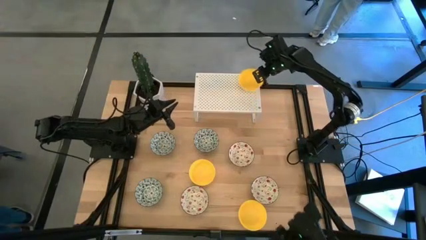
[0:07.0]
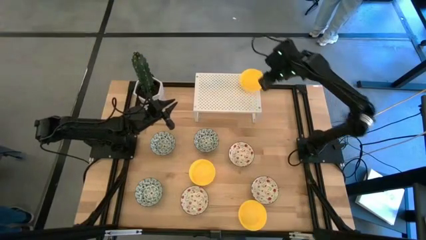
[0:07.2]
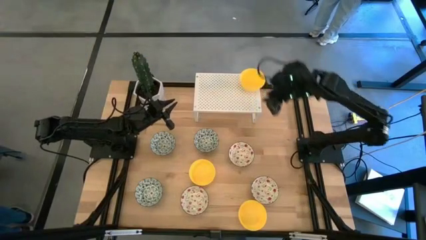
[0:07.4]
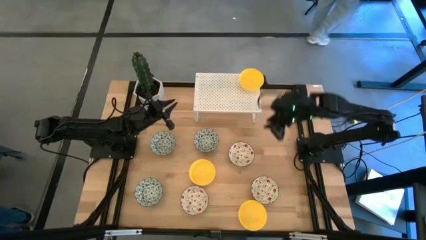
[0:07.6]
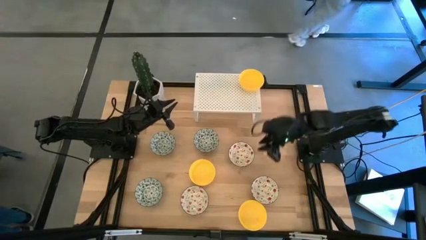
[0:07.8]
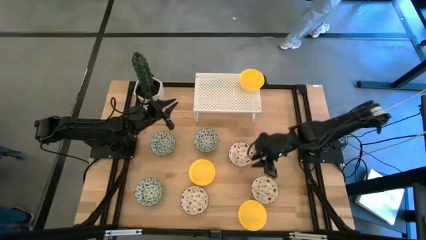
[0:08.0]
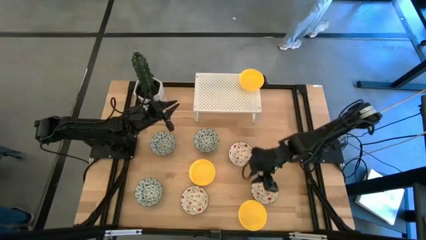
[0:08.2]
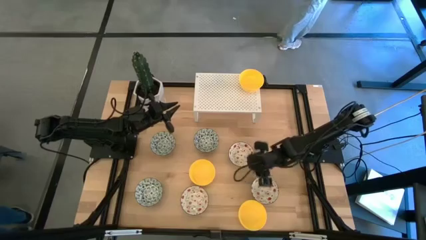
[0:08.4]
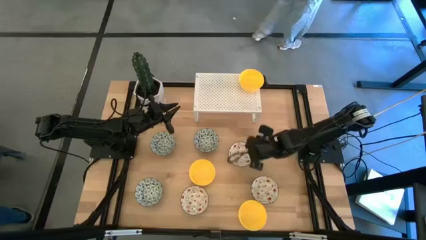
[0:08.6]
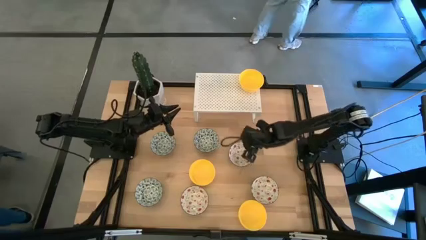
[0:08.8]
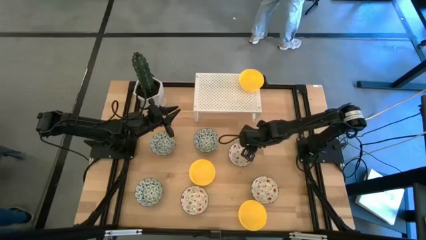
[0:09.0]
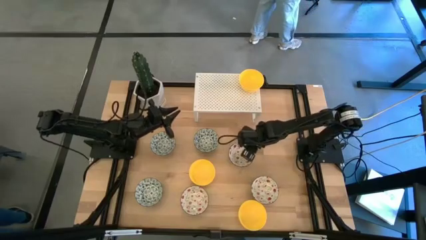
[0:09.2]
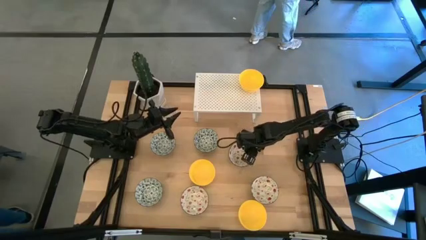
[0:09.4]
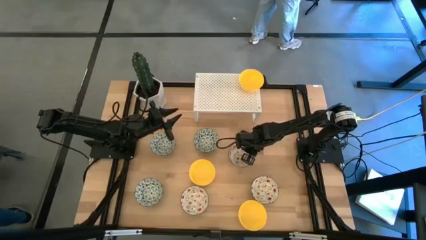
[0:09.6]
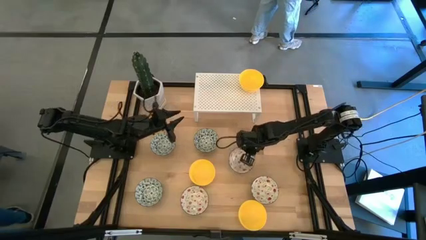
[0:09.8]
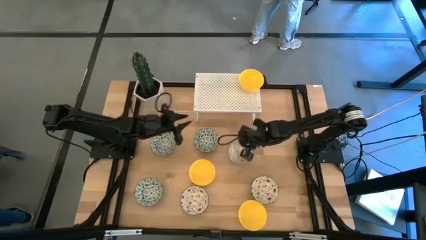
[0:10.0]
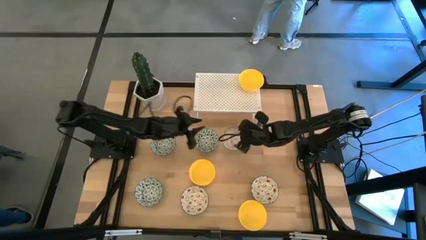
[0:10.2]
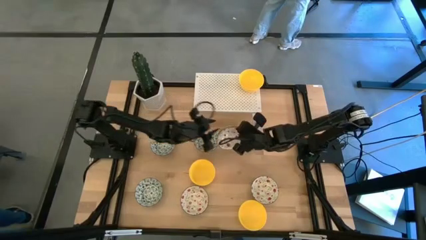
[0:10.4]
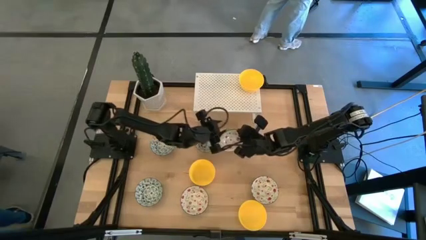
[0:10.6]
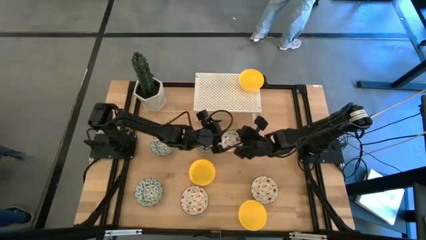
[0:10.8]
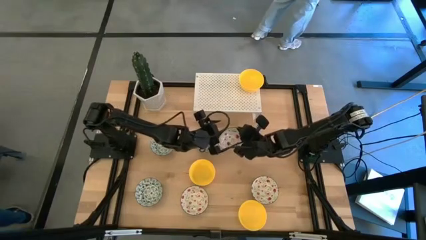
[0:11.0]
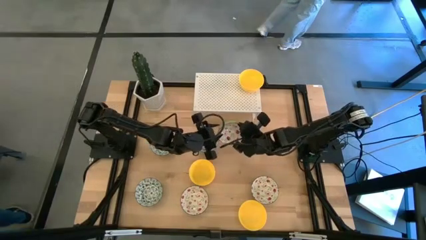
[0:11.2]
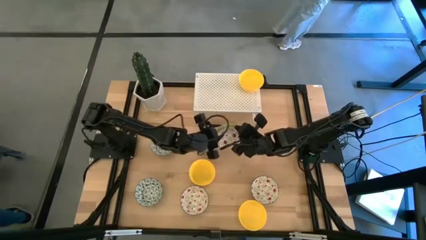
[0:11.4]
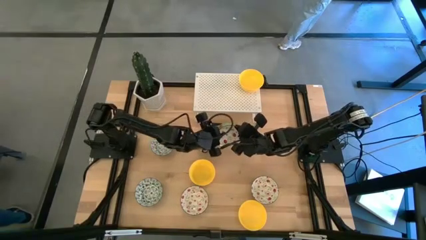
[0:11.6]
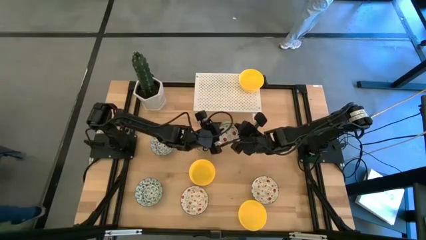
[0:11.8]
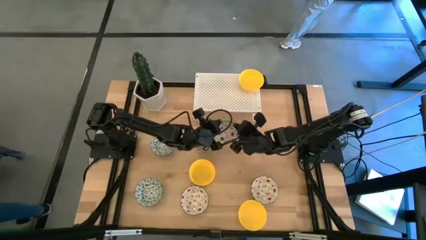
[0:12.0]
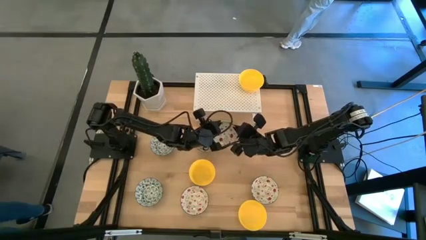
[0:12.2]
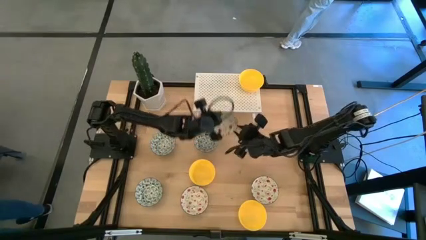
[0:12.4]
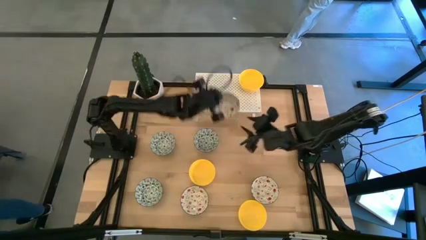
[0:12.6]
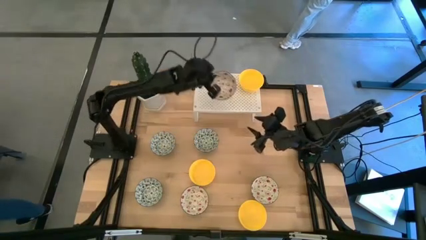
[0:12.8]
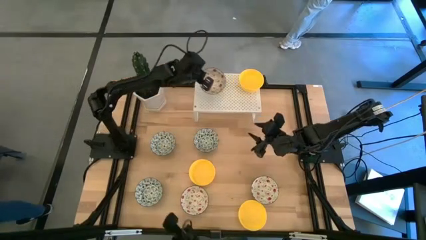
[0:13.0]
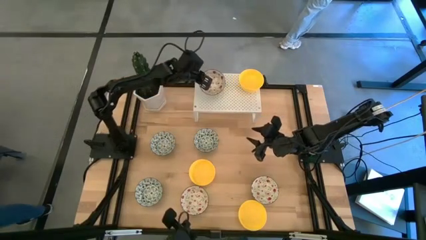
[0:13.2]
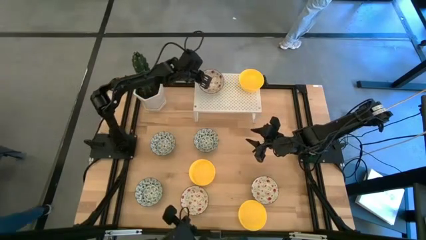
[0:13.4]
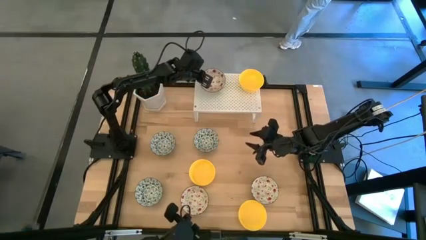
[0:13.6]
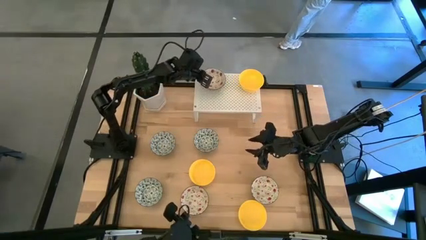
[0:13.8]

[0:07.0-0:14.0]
Task: Pick & Place Mini bowls
Put the top red white bowl on the shelf

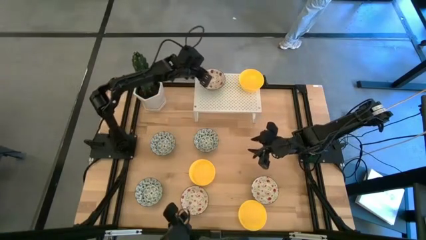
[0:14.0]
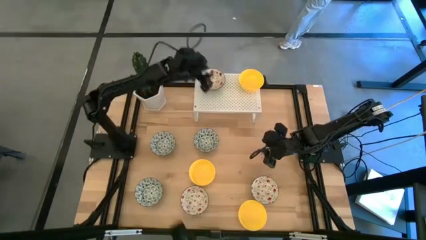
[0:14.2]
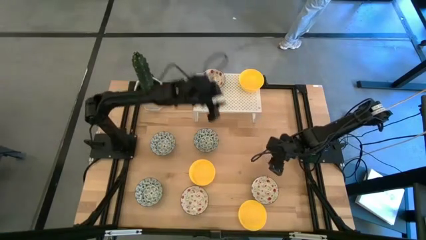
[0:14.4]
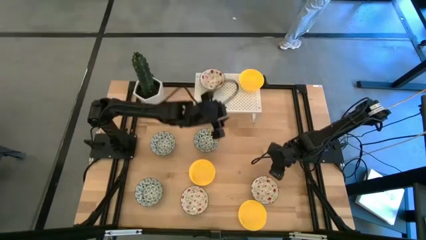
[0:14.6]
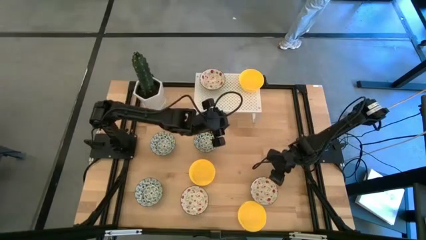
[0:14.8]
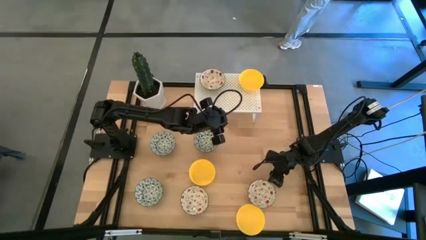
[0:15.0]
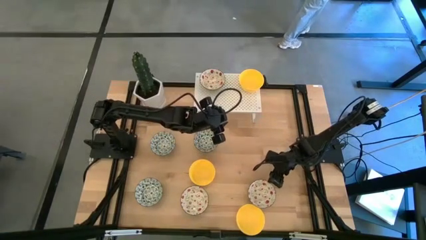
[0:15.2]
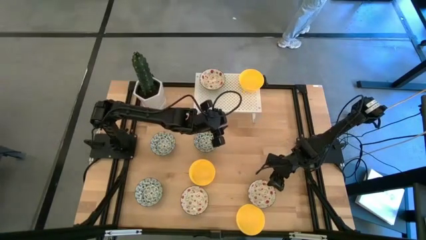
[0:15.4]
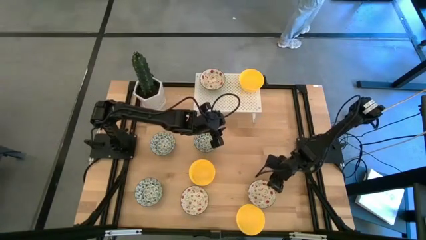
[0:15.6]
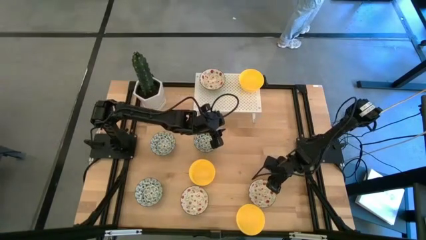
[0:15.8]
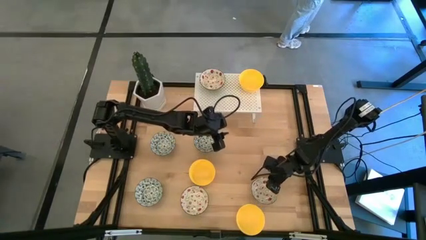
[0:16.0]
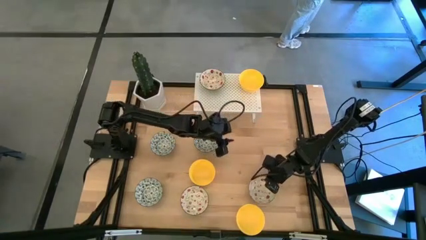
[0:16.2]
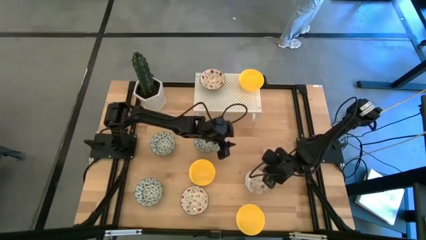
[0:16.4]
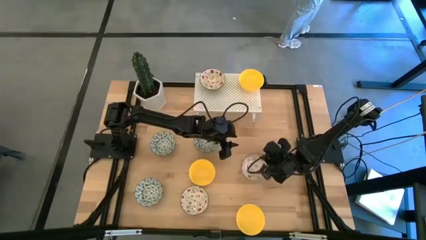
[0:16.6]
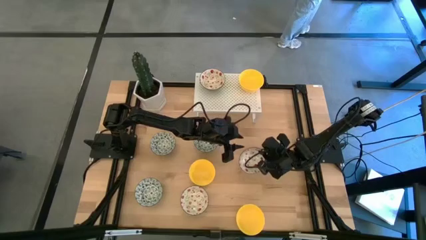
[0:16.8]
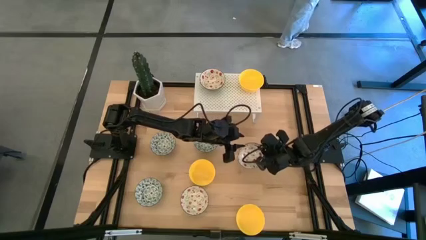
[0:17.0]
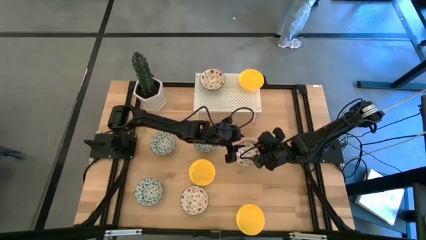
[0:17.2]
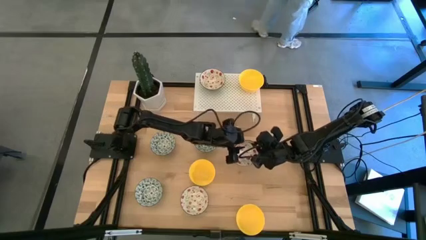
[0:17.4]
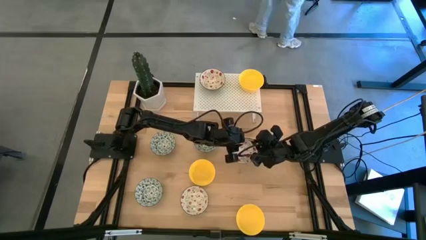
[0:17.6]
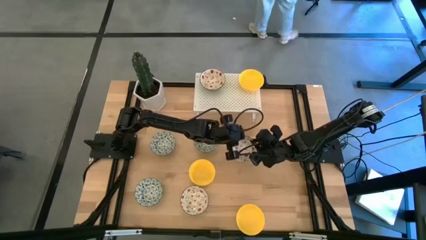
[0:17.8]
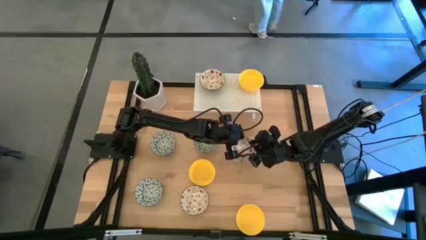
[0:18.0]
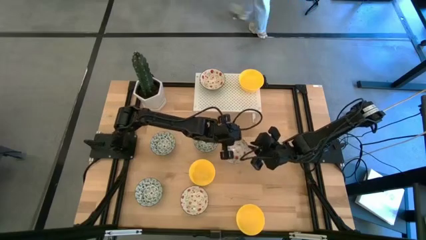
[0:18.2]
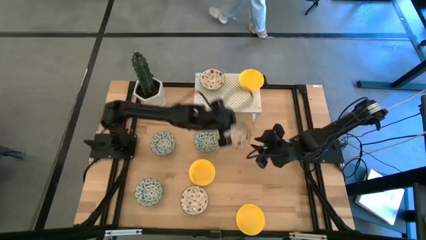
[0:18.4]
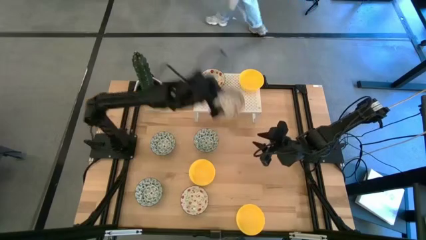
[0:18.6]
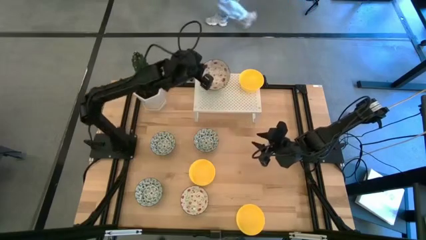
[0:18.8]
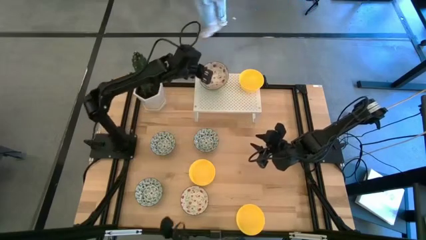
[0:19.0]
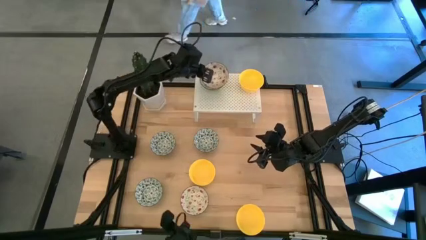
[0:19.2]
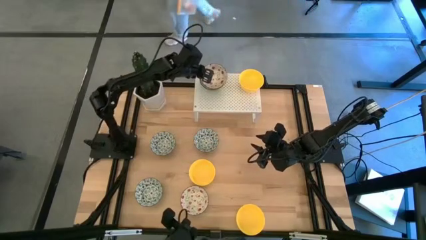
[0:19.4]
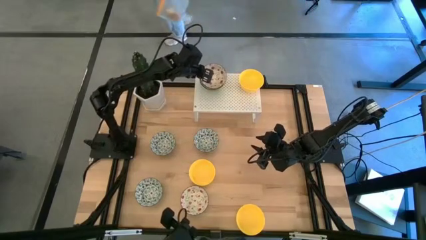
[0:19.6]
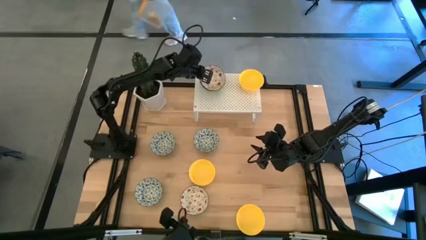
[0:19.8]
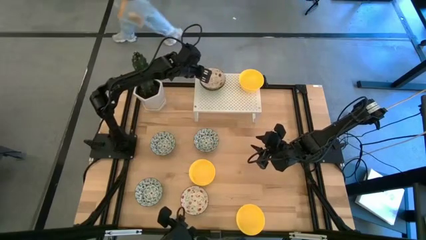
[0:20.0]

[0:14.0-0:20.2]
Stack the right red white bowl on top of the red white bowl on the shelf

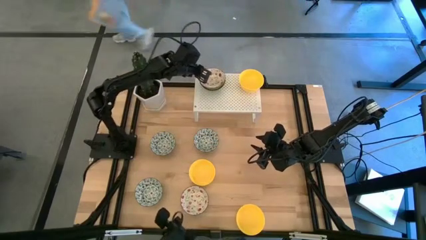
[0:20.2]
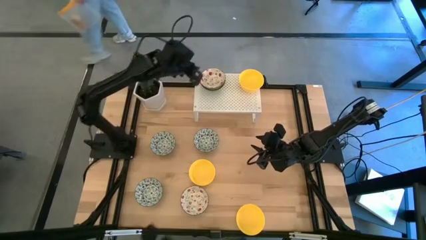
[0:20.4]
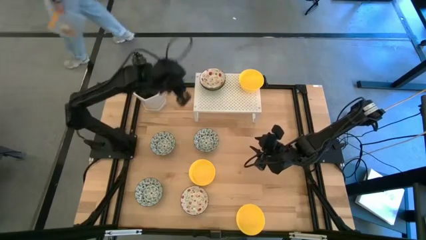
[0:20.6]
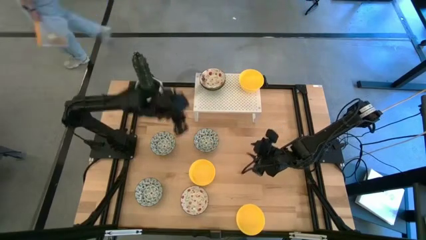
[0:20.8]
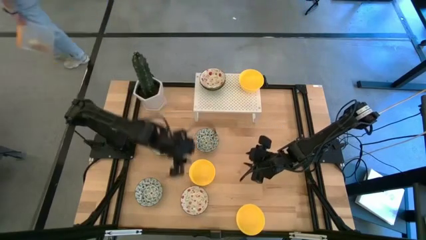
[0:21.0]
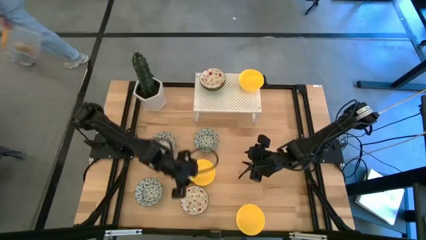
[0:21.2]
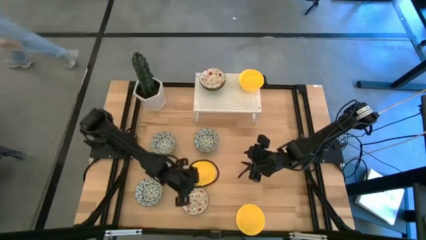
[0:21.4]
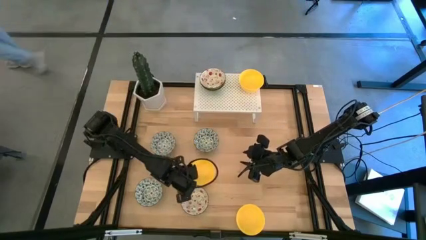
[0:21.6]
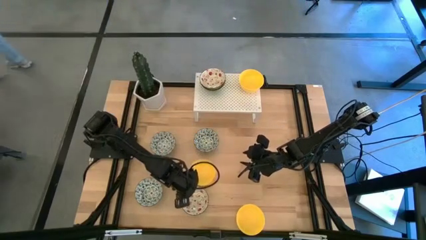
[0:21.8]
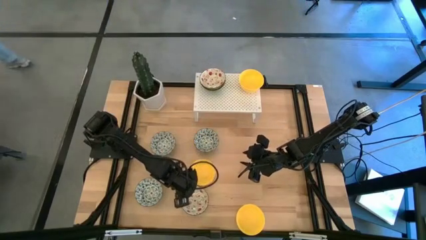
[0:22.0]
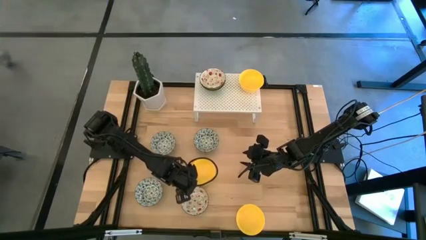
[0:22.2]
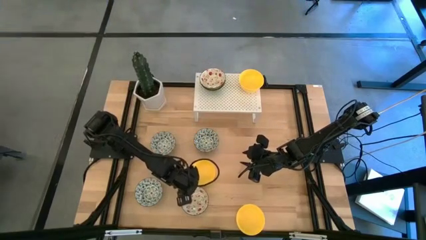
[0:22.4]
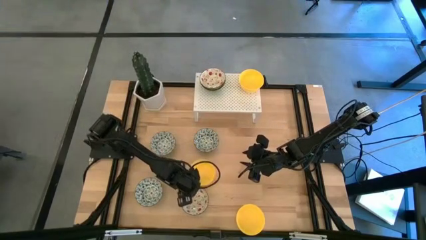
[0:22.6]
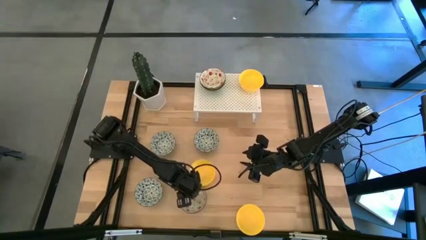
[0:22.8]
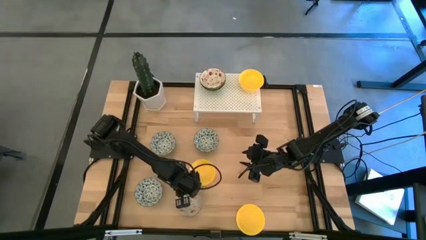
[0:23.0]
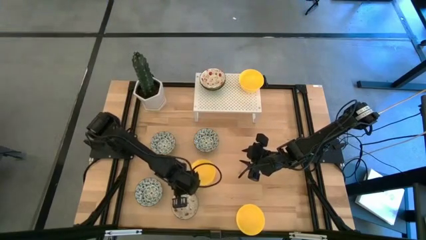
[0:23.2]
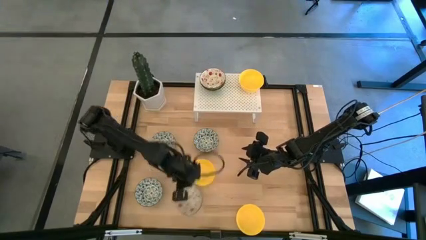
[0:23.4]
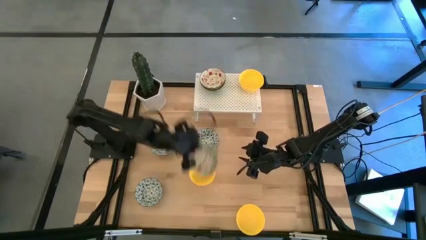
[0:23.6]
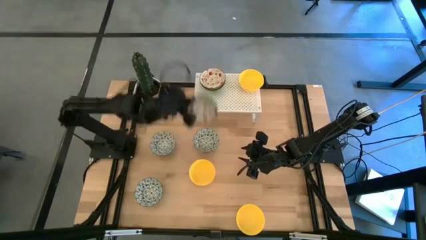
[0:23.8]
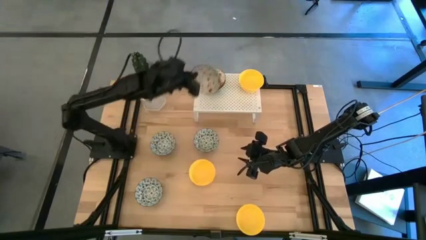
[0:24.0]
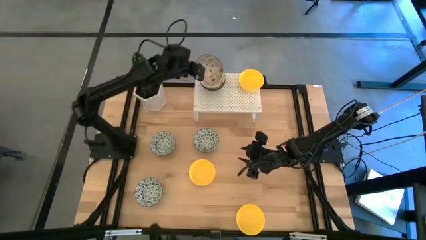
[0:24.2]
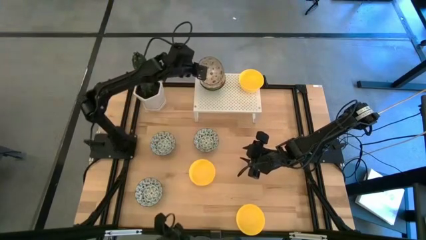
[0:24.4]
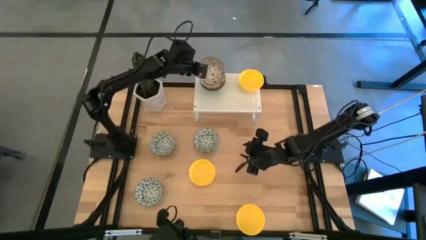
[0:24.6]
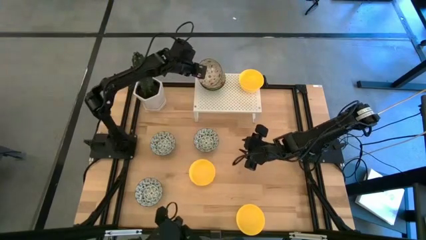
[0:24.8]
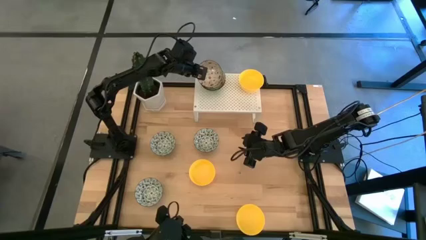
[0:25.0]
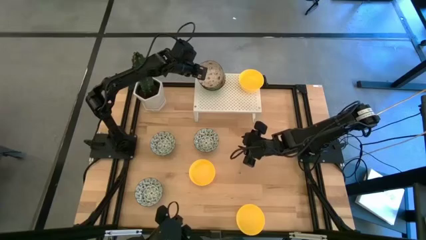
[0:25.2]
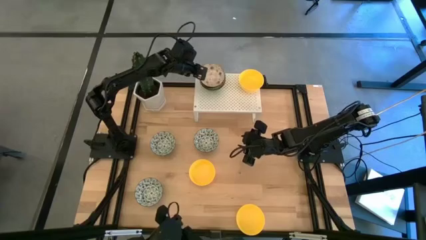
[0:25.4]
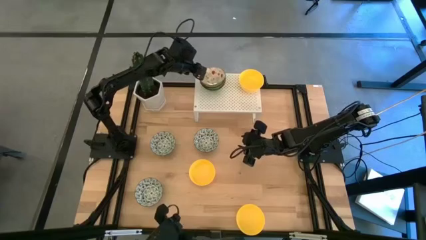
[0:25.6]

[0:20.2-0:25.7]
Stack the red white bowl on top of the red white bowl on the shelf
